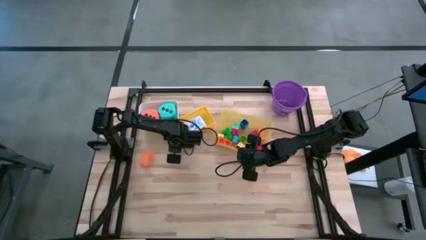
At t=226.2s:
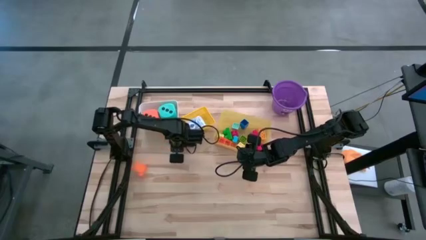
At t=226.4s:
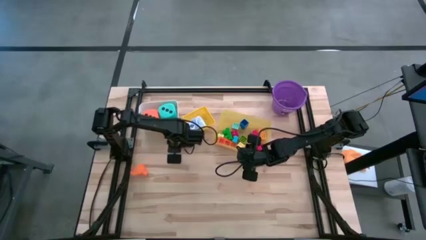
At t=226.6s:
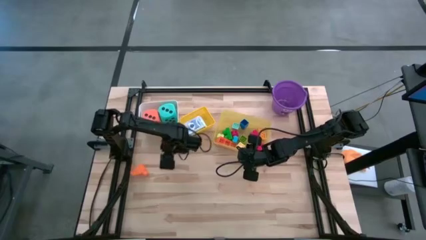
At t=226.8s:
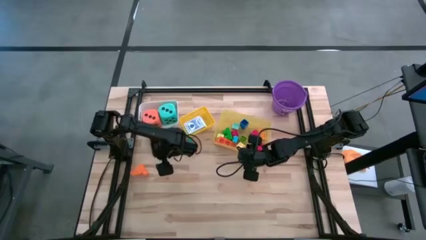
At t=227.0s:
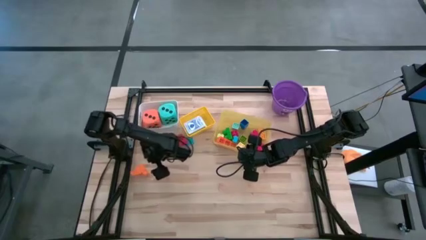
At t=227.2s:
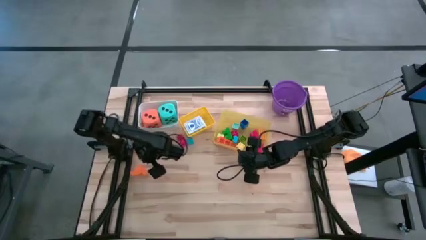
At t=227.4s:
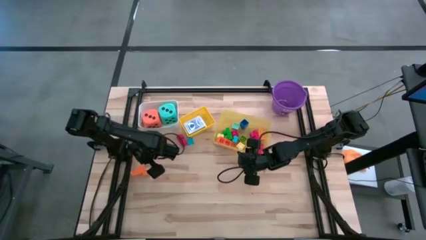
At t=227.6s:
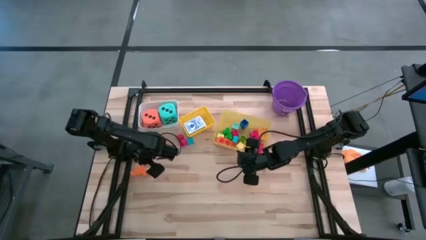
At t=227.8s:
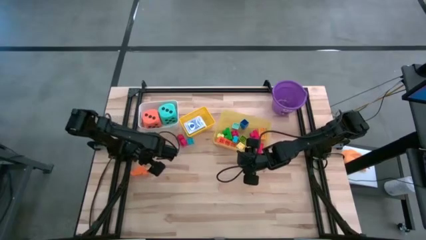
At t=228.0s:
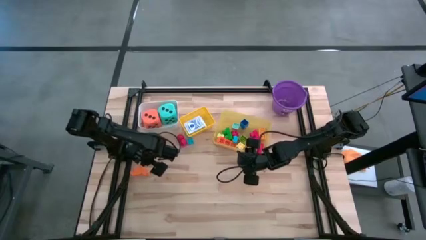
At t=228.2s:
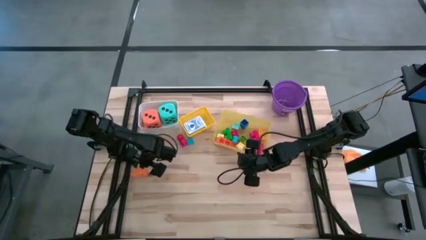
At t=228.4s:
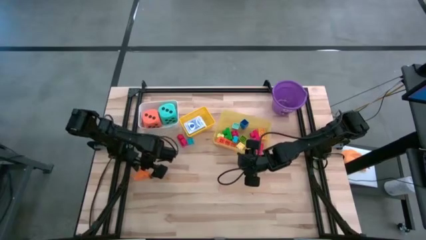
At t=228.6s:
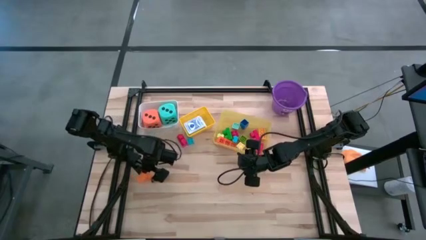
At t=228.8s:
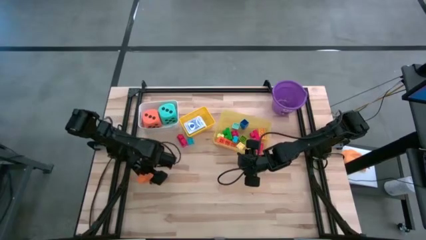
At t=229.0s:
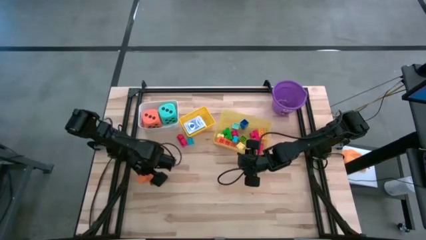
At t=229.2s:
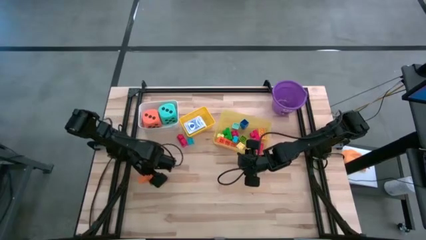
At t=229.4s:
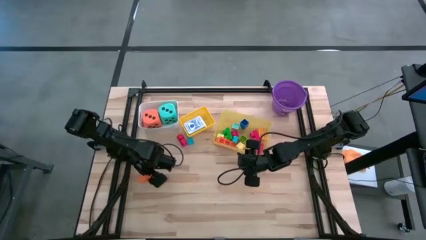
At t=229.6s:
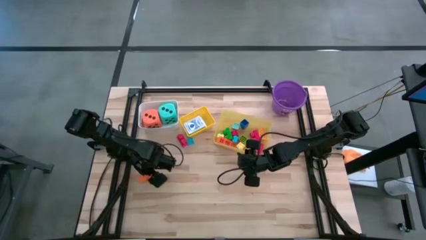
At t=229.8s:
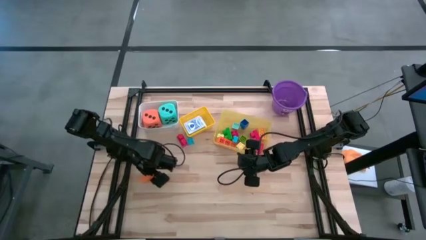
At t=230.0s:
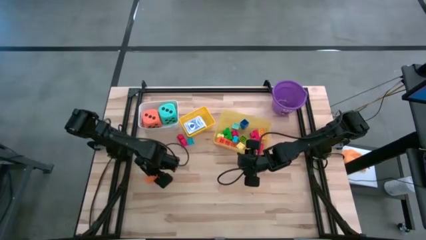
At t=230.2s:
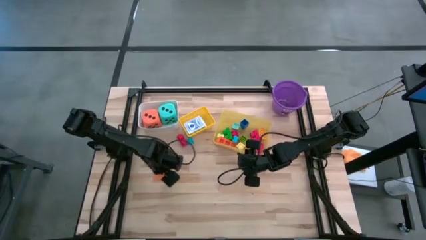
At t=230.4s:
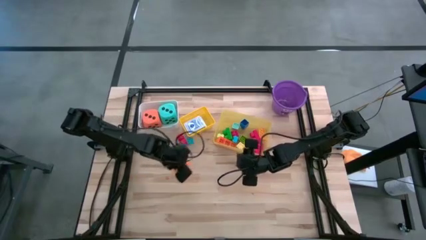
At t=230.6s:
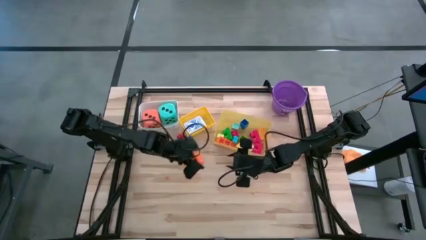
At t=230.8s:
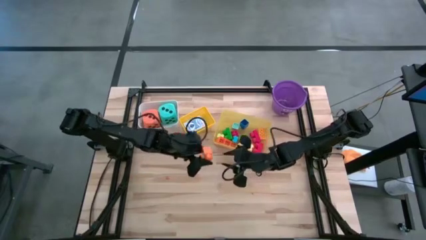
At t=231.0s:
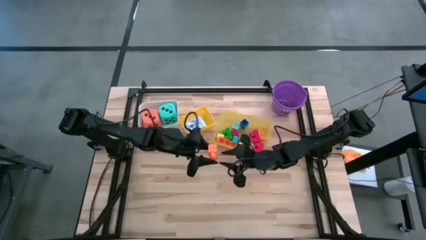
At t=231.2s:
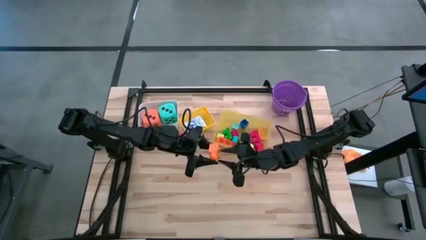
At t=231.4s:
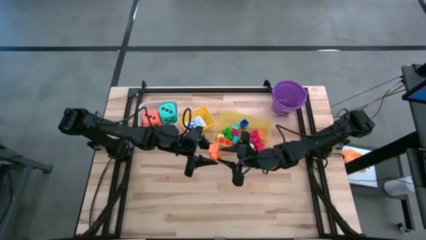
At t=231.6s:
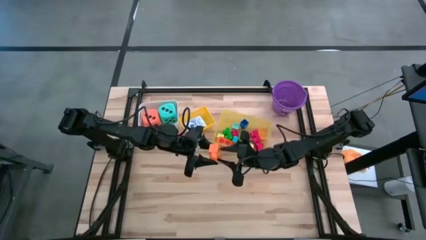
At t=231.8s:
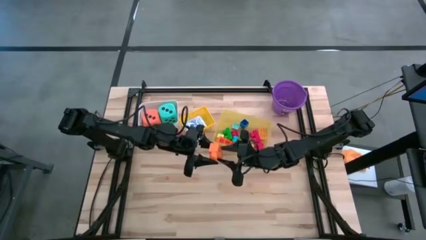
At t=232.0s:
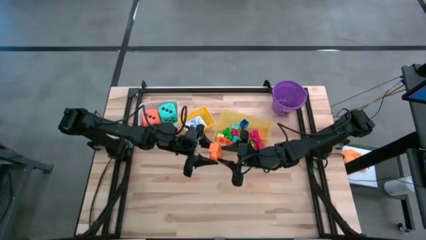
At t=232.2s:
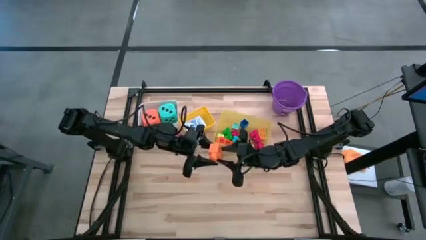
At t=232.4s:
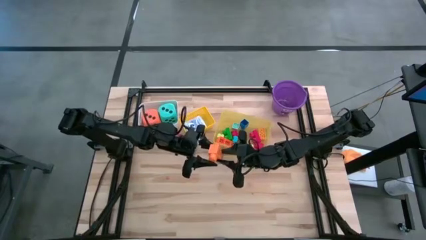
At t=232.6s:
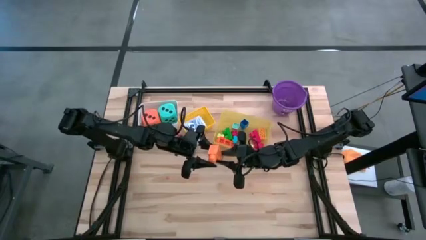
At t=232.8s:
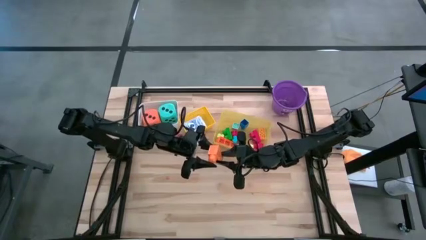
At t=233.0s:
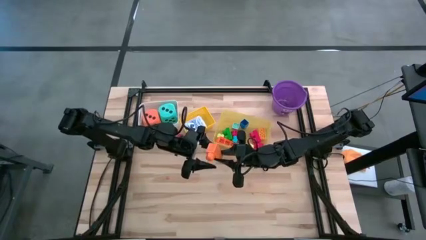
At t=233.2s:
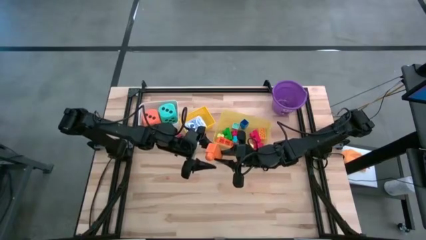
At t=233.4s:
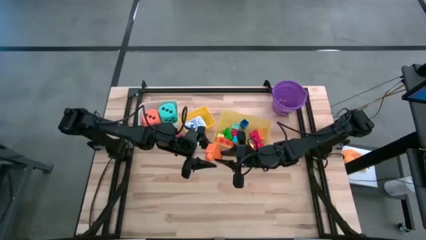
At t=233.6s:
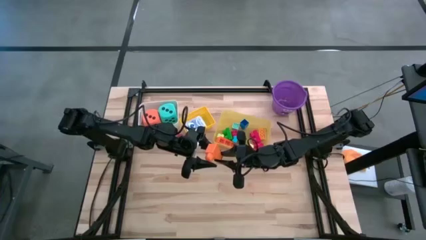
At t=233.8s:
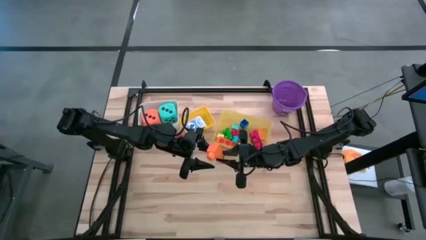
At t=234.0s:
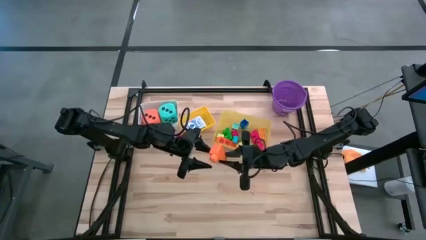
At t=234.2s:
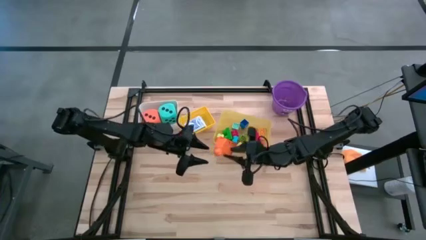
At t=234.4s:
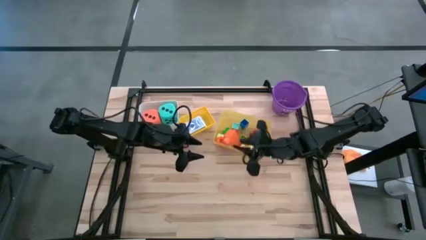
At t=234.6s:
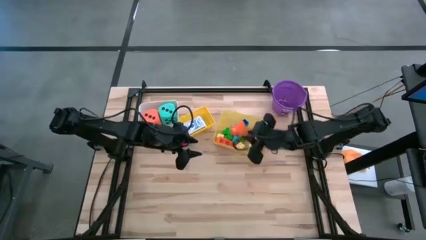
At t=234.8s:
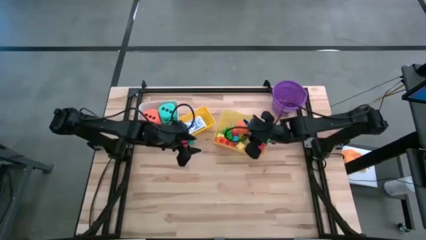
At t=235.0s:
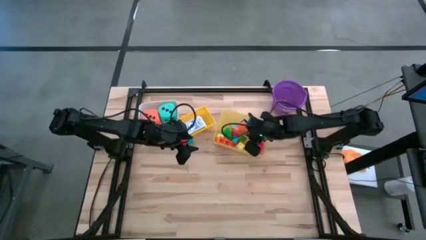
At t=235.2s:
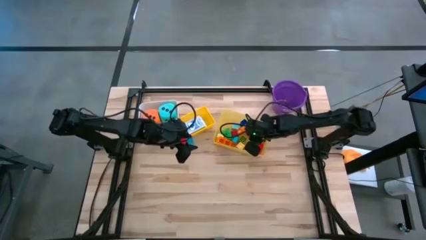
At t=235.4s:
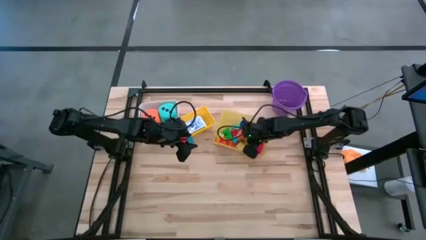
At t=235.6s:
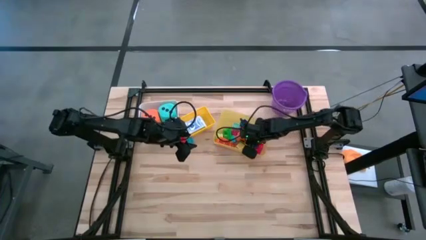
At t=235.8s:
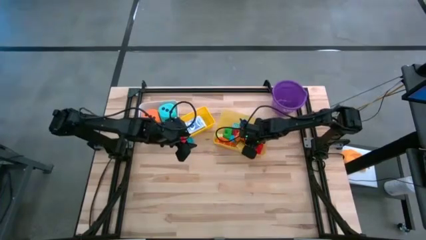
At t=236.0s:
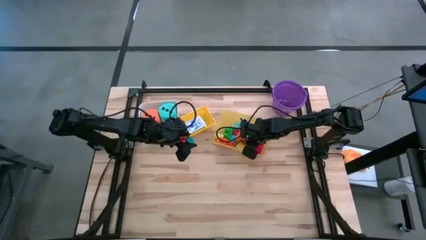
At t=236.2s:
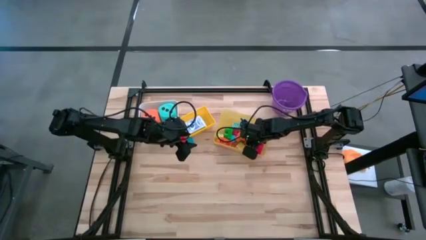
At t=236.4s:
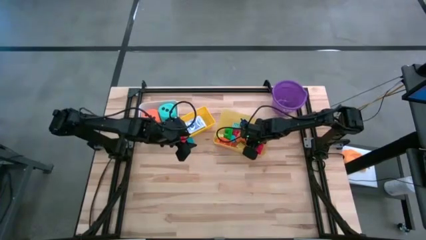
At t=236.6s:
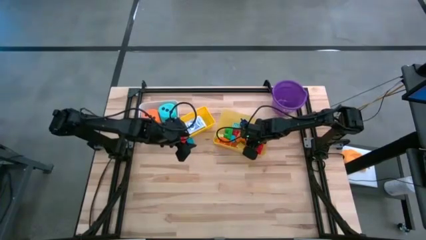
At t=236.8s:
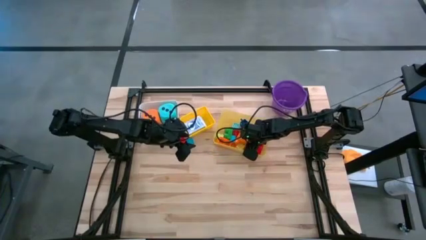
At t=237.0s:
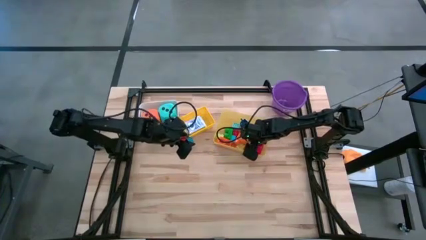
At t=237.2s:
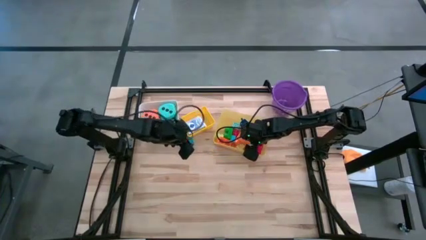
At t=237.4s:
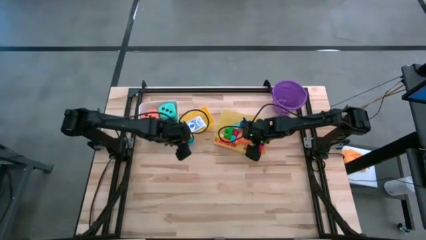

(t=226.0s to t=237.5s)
Task: Pick & Place Toys
Put the orange game piece into the yellow bin

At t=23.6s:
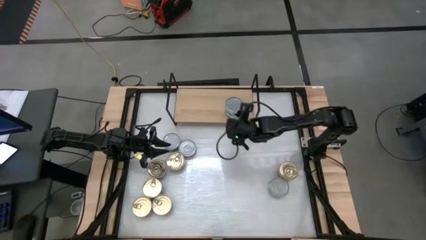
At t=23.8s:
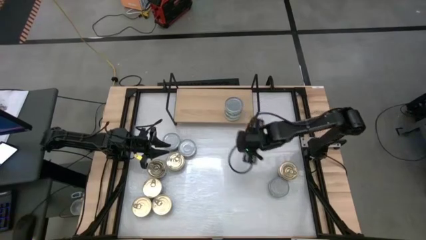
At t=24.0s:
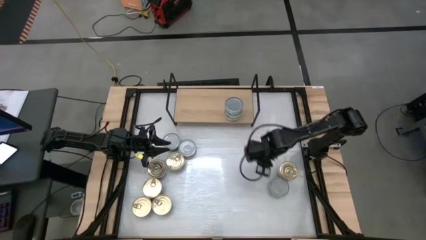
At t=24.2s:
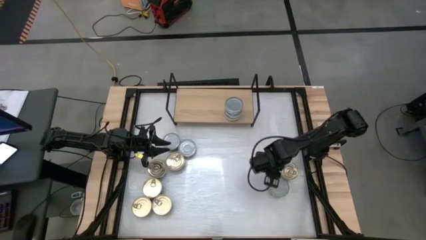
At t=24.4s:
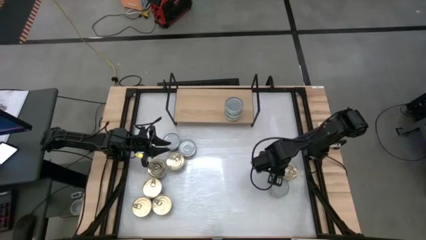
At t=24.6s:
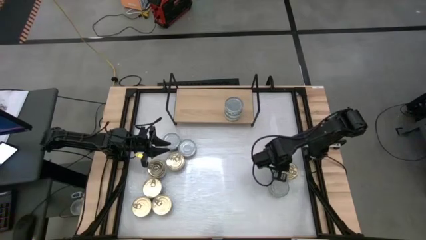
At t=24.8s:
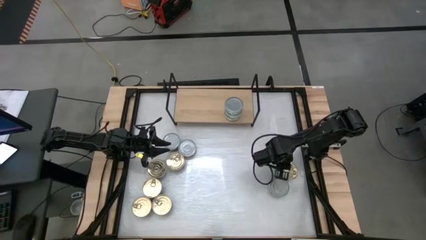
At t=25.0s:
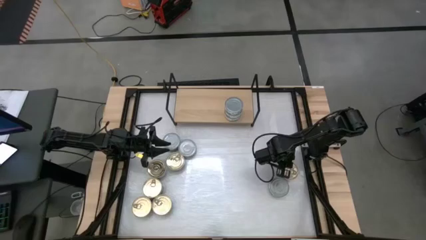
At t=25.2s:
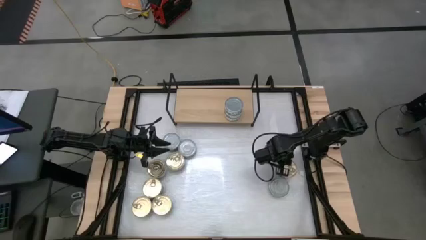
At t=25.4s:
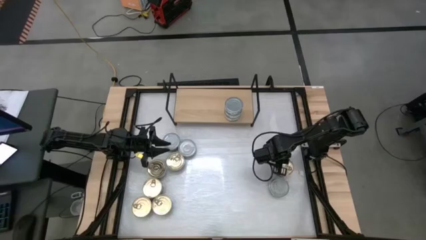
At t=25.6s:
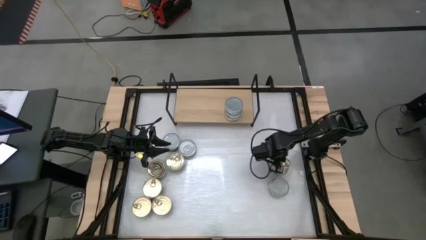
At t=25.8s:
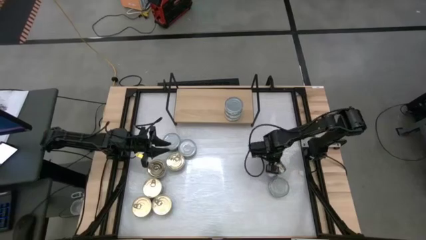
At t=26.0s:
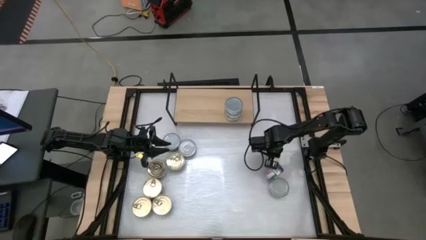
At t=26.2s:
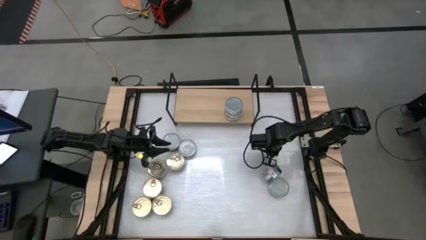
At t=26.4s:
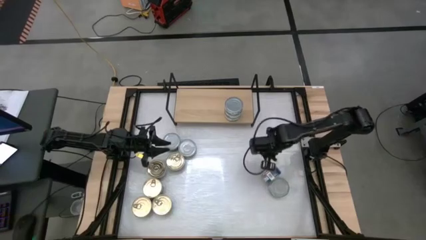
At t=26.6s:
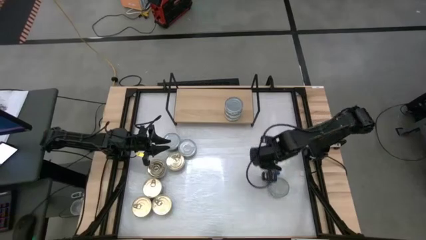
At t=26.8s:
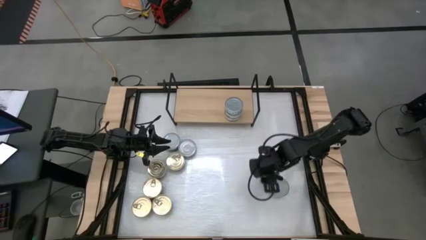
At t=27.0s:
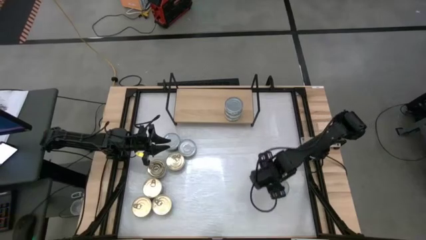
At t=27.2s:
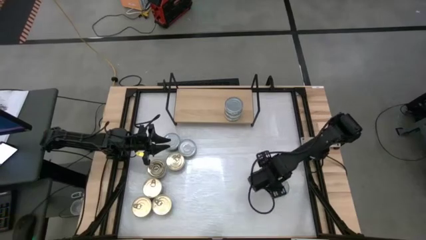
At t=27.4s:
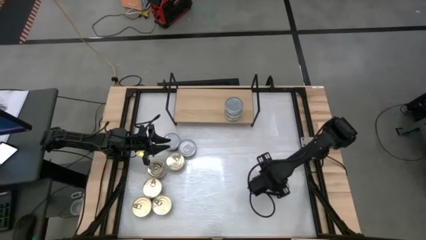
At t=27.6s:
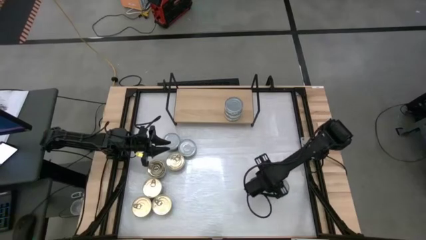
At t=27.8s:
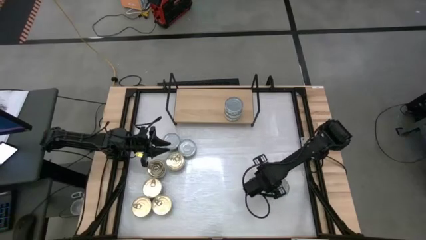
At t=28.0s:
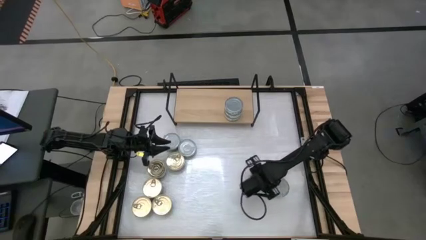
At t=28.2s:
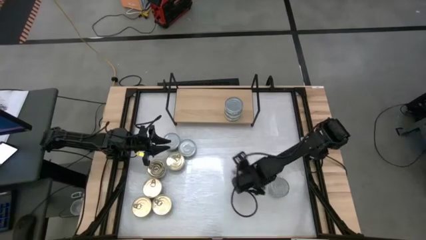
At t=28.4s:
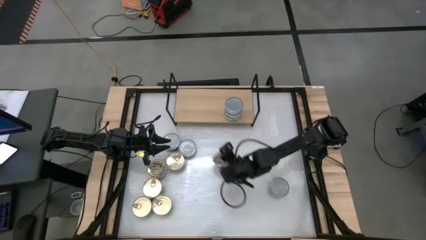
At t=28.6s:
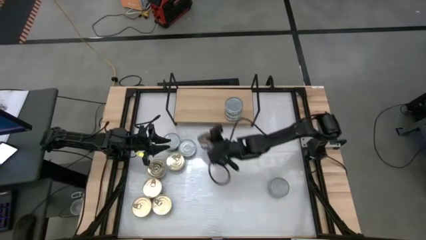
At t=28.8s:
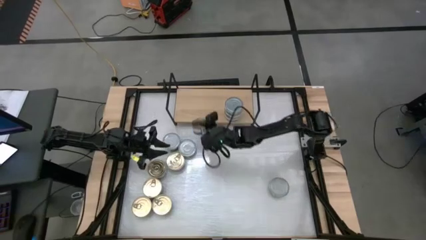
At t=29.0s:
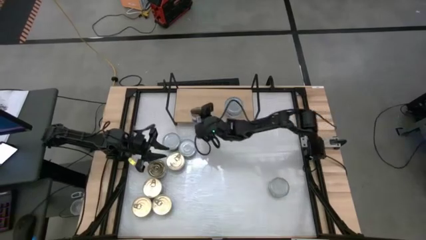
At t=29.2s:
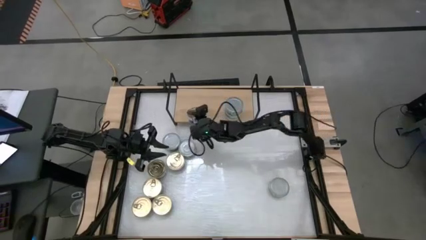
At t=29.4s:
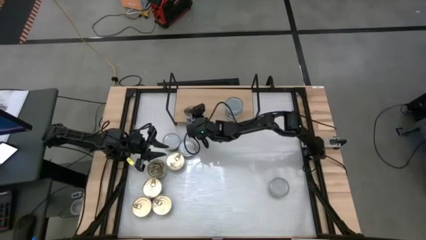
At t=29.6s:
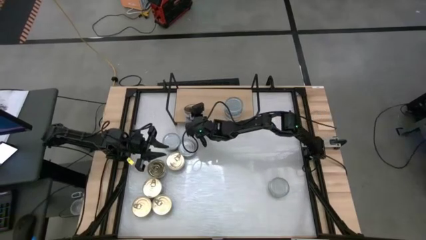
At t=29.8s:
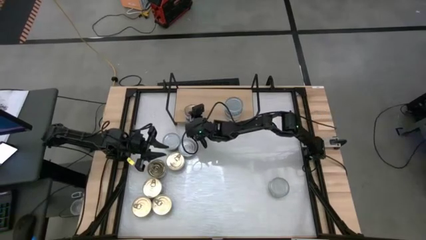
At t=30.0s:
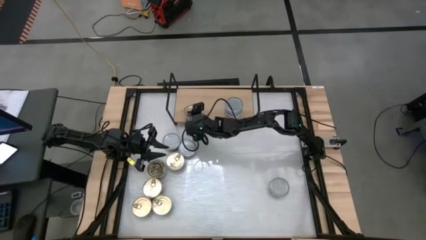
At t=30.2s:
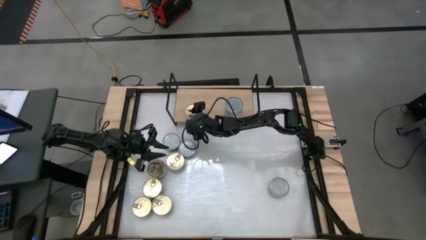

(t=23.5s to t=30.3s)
Task: Stack canned seafood by type on shelf
Put the blue pink tuna can on the shelf
